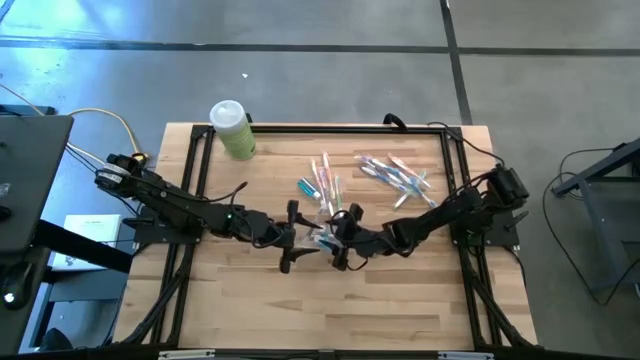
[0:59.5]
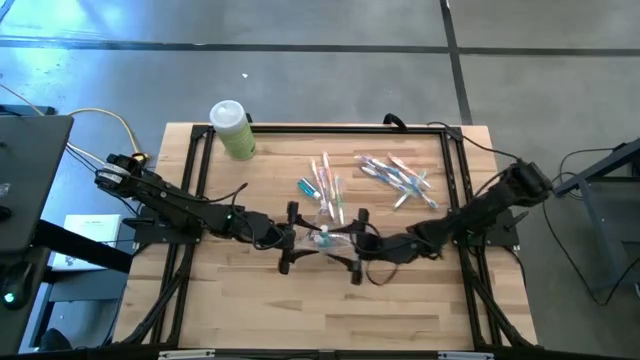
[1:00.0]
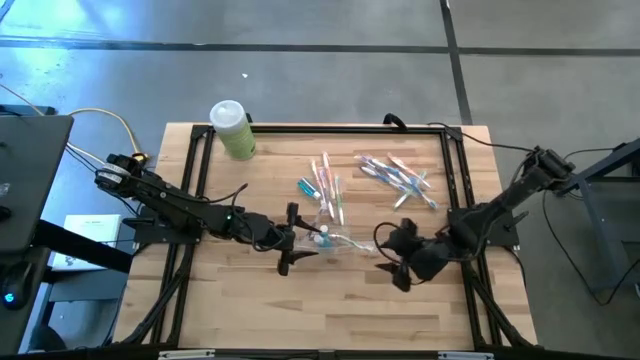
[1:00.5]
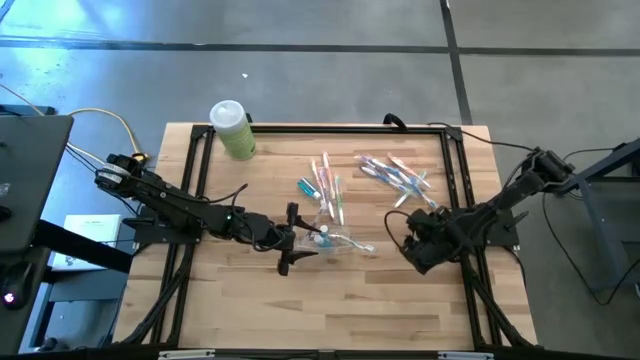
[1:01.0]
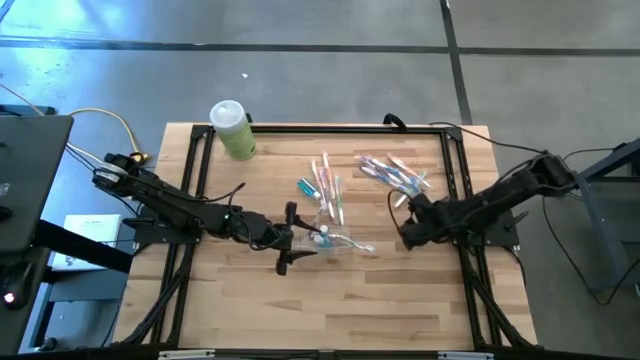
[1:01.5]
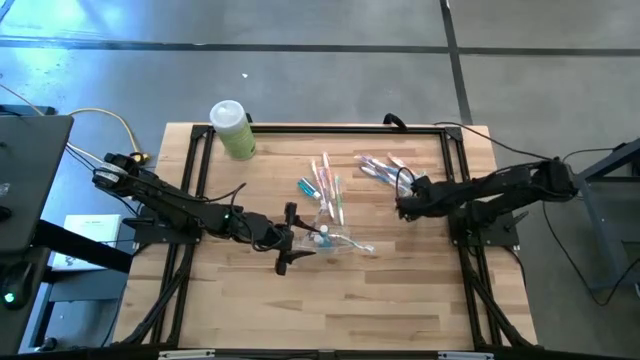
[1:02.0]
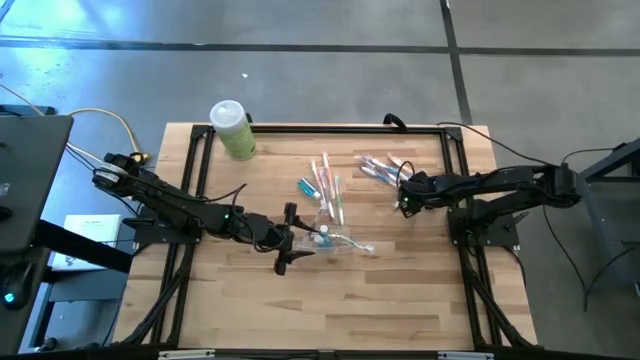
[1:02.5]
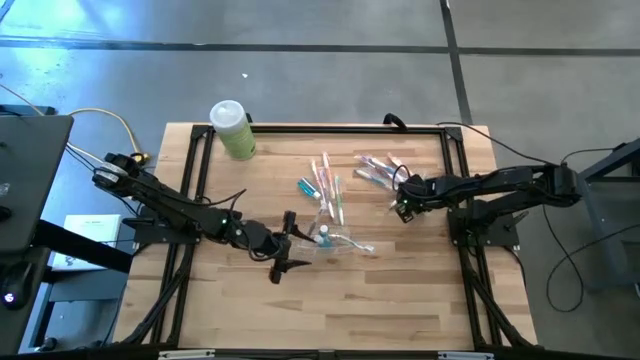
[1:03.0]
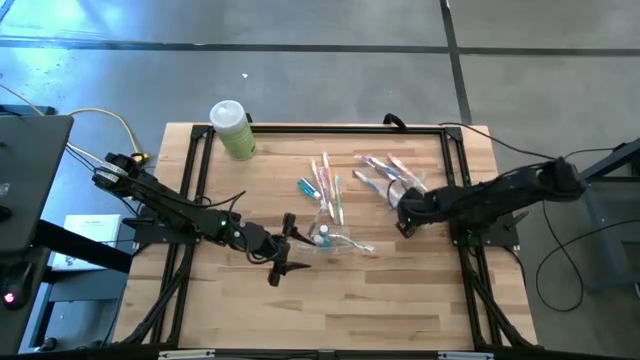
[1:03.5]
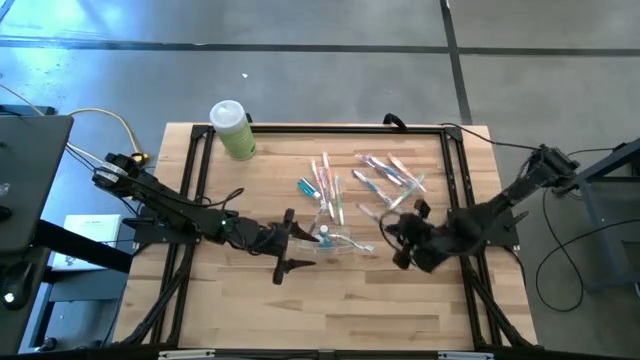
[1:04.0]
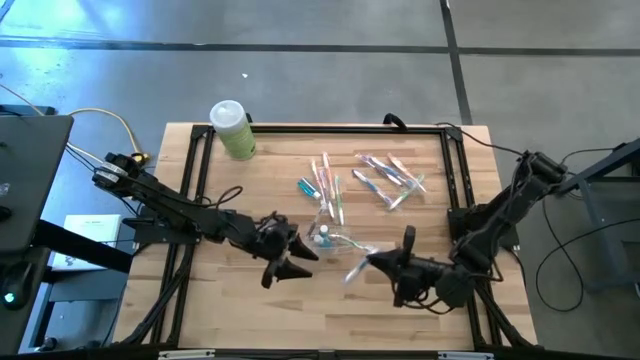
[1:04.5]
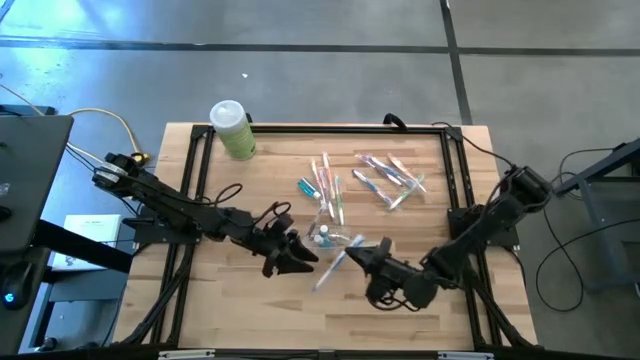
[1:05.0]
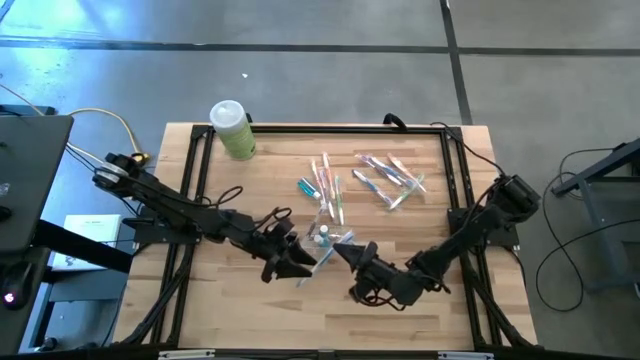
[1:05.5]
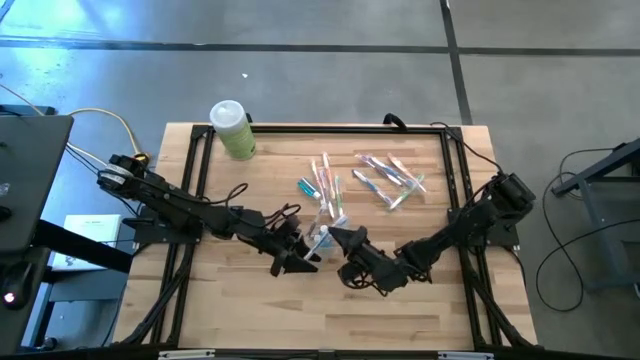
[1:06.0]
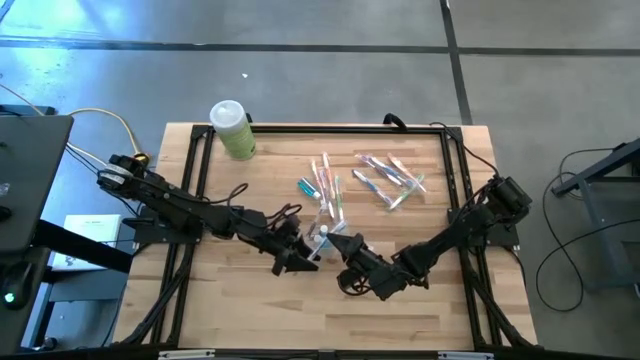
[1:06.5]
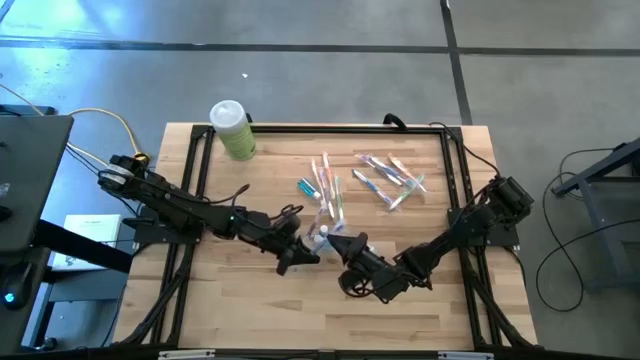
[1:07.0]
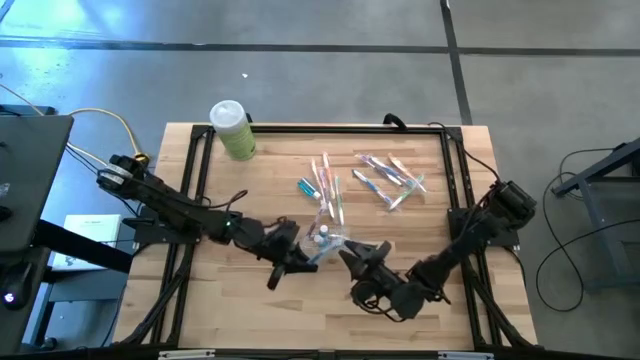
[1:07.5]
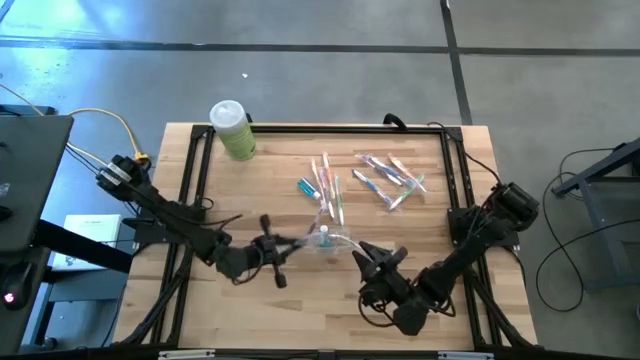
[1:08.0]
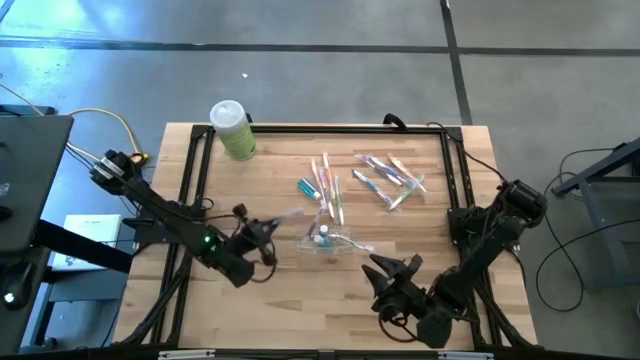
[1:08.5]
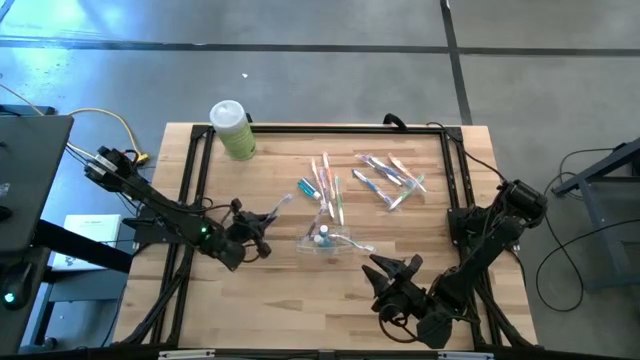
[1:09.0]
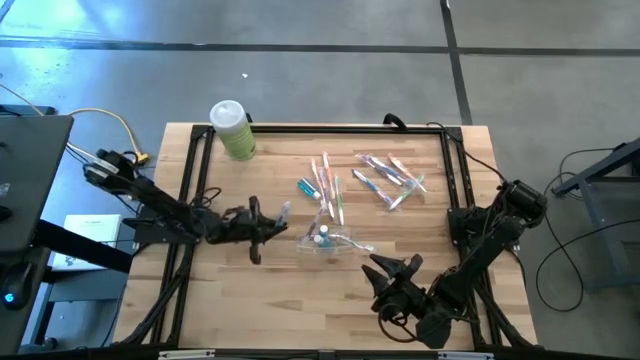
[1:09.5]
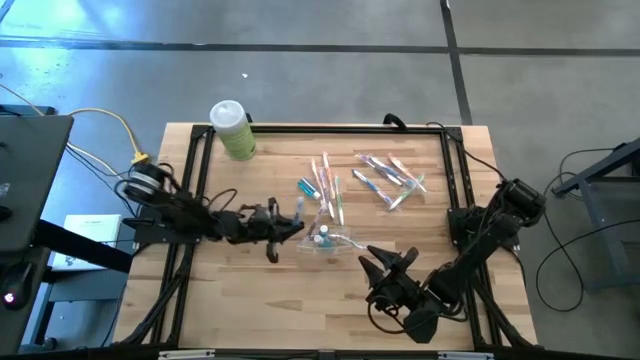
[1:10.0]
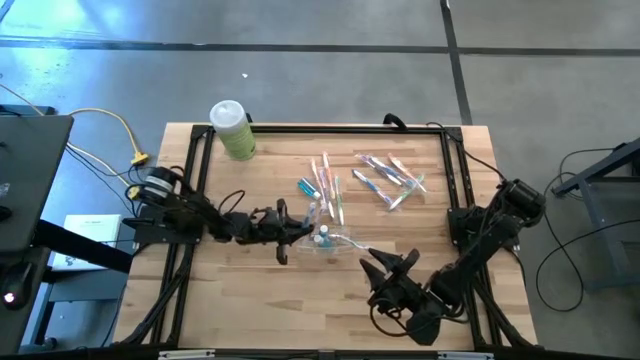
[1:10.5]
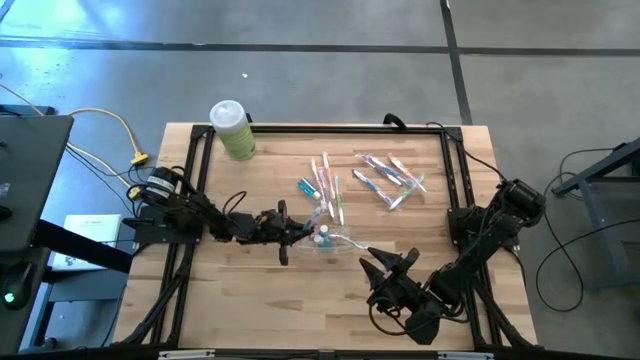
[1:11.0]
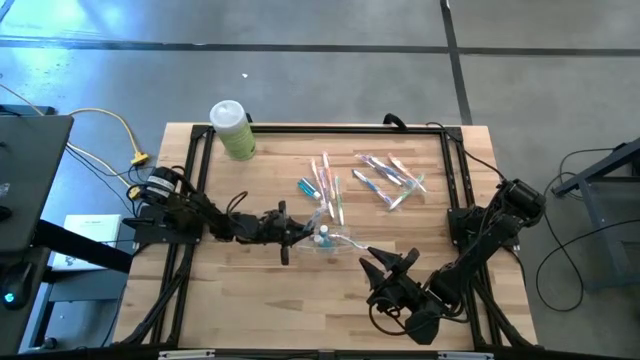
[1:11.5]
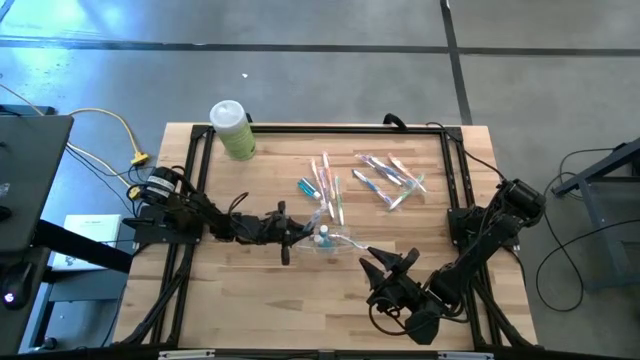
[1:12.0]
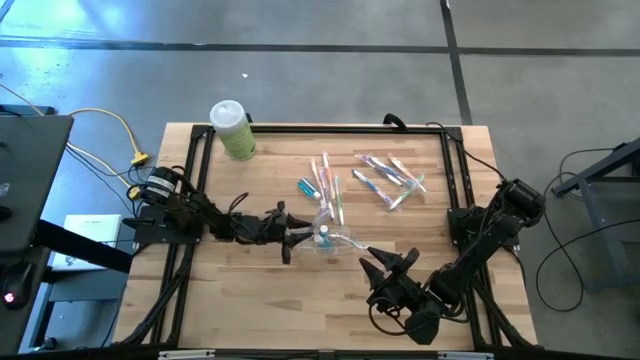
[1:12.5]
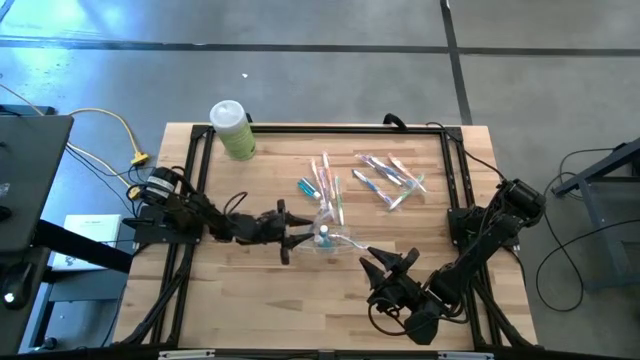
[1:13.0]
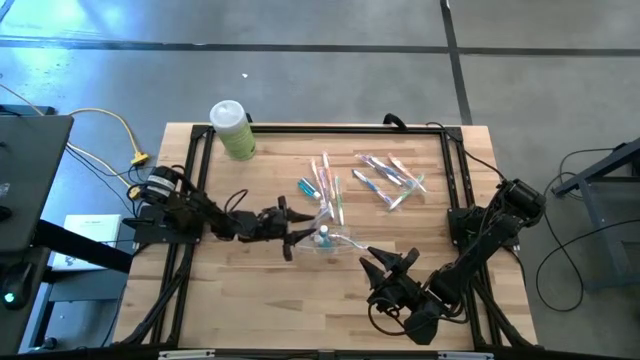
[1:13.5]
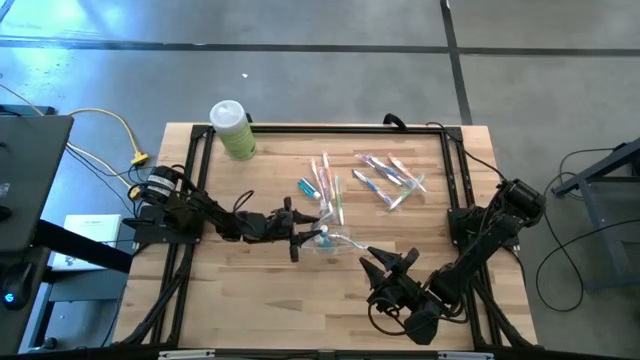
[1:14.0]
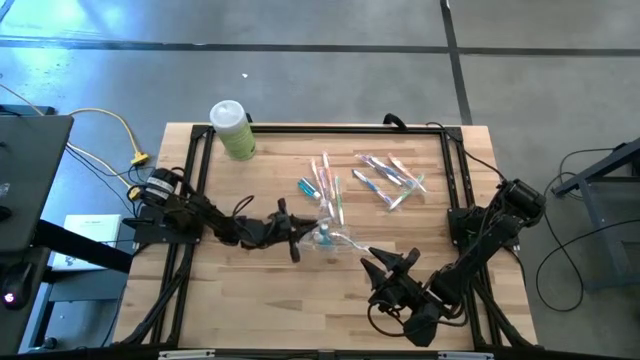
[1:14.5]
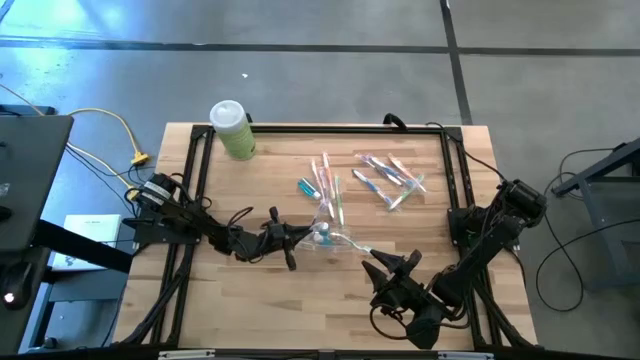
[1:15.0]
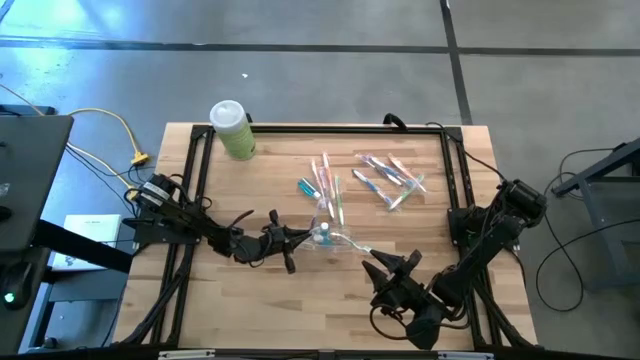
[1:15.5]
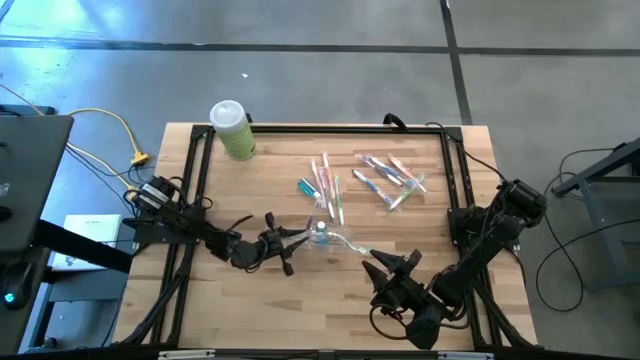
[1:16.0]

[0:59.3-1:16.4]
Task: Pick & Place toothbrushing station
Put the blue toothbrush into the transparent organizer

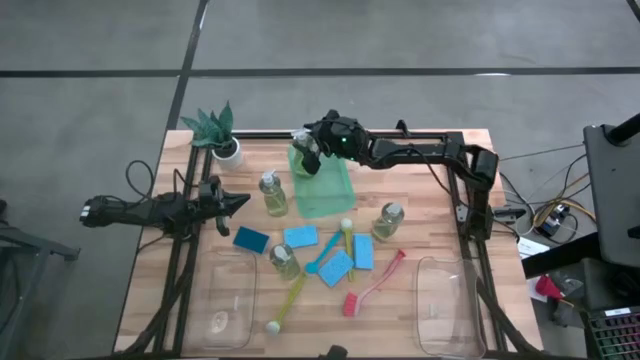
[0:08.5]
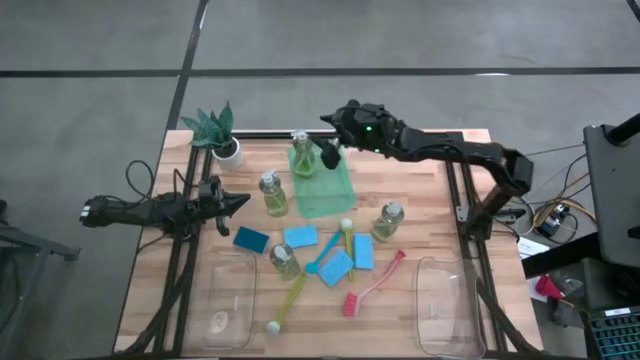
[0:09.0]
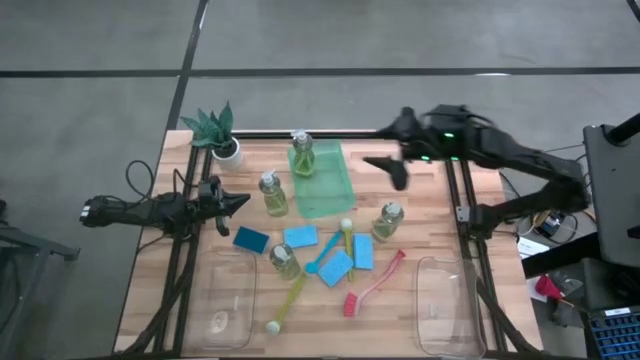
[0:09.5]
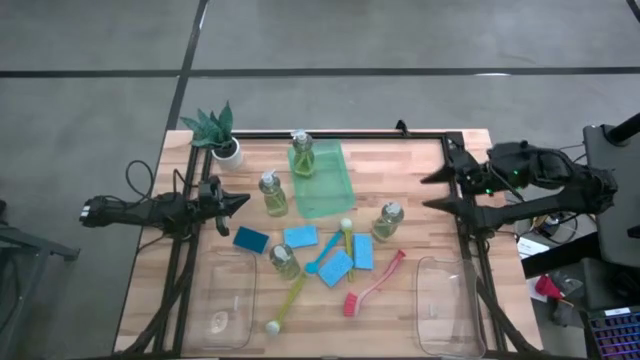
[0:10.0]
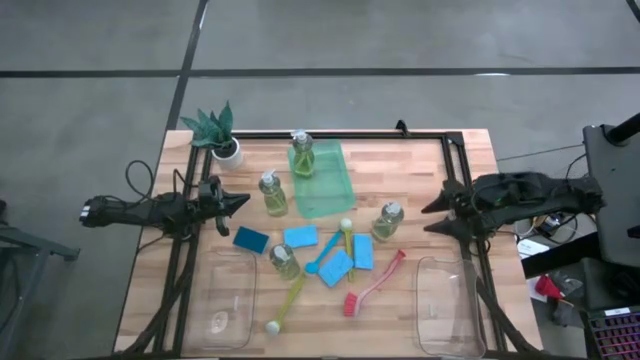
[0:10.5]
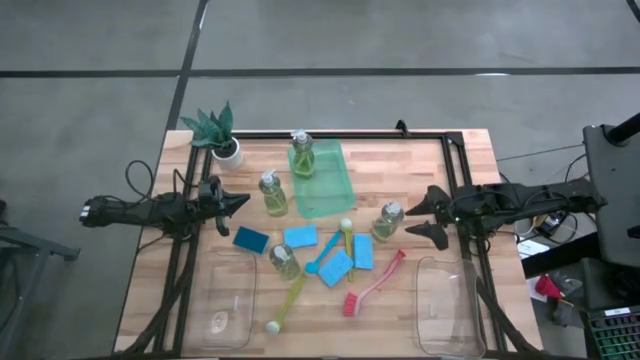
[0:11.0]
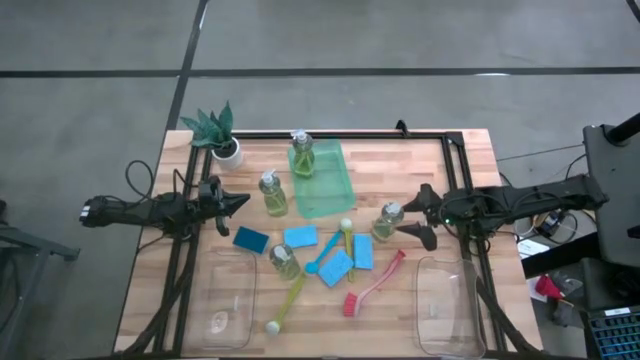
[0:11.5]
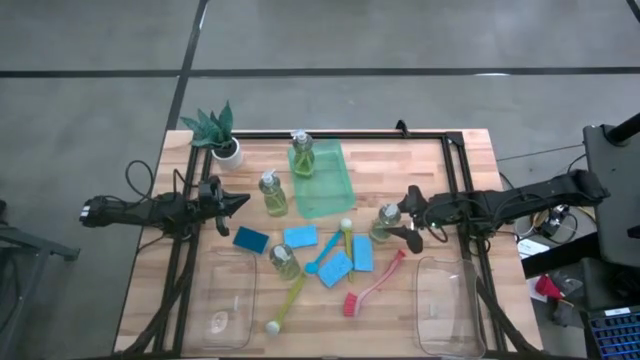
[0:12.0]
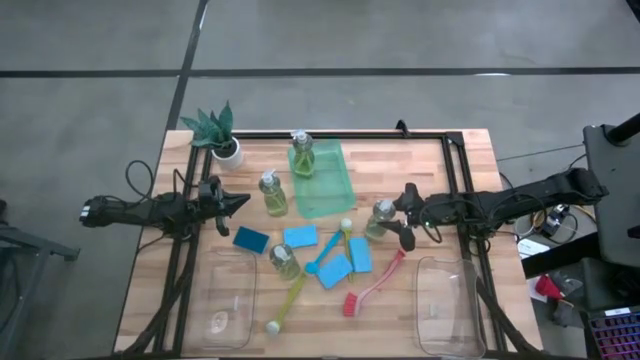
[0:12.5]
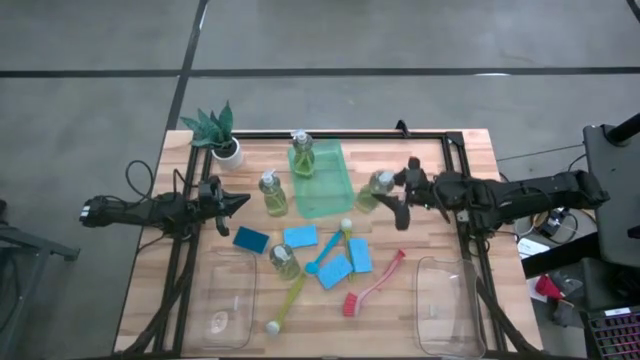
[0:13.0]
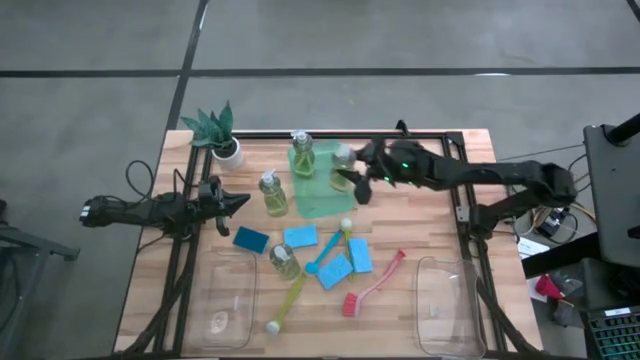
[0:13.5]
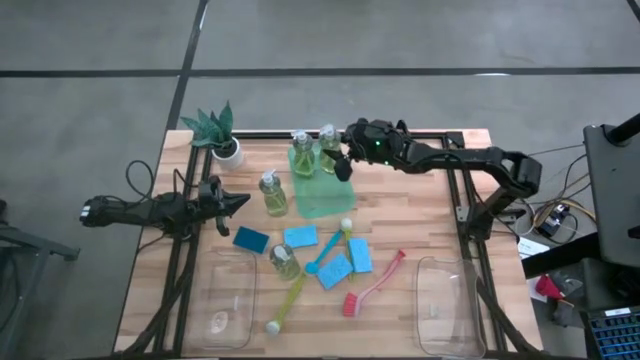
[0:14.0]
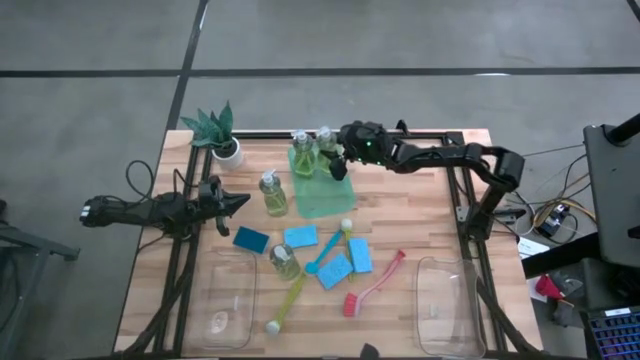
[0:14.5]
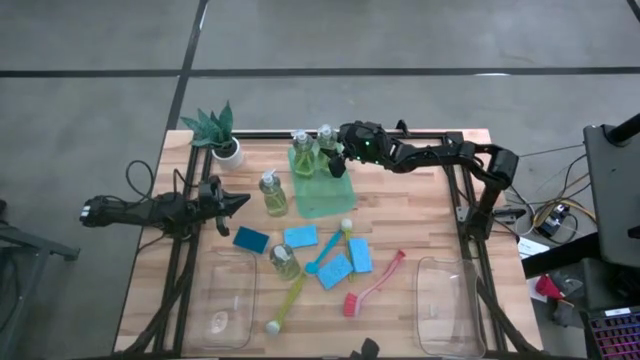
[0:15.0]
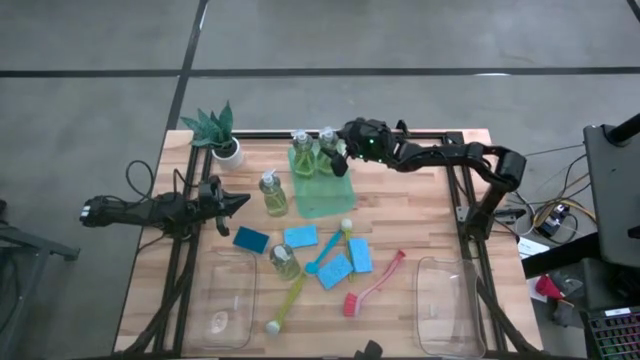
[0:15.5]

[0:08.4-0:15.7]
Task: Pick & Place Kitchen Sink Supplies
Put the green soap dispenser into the green bin
